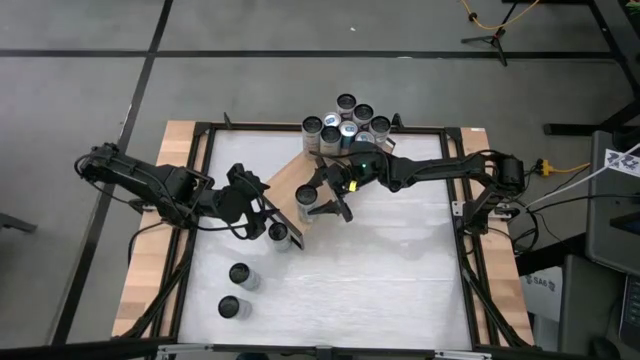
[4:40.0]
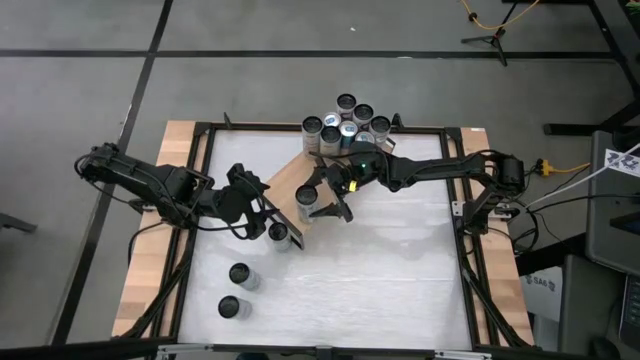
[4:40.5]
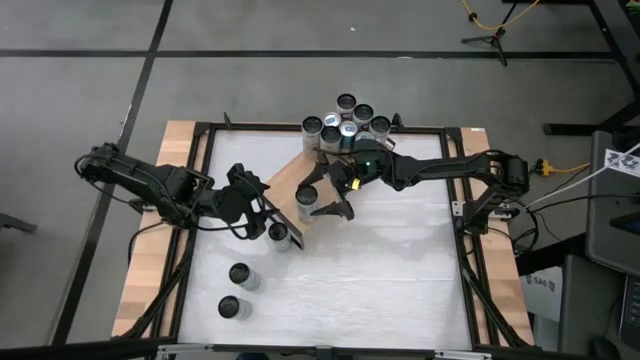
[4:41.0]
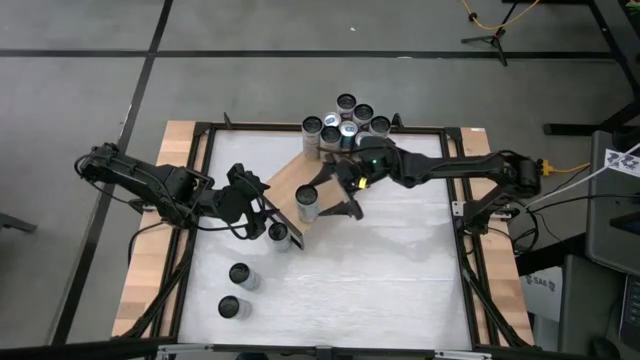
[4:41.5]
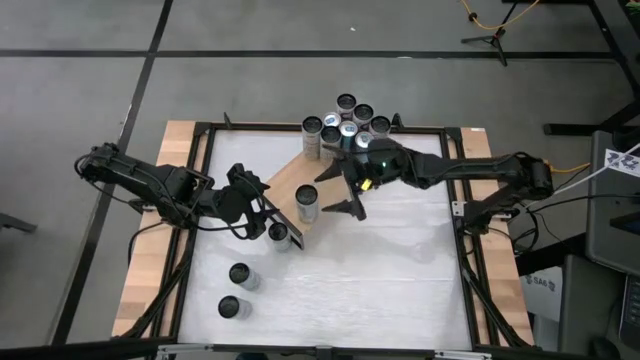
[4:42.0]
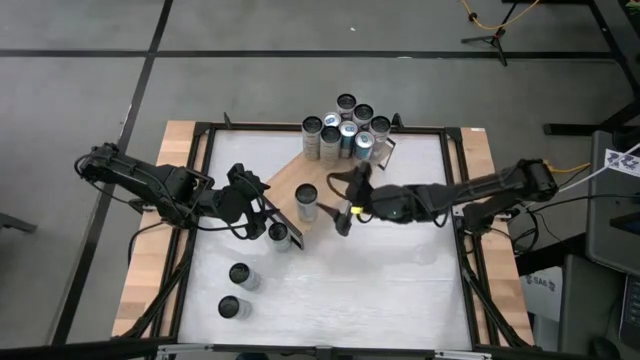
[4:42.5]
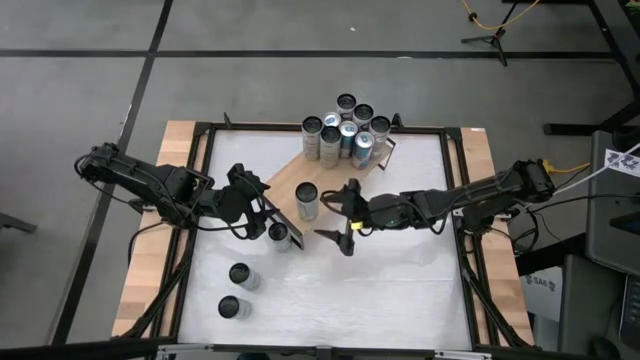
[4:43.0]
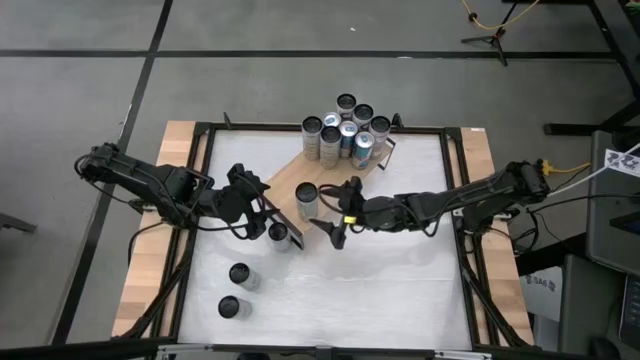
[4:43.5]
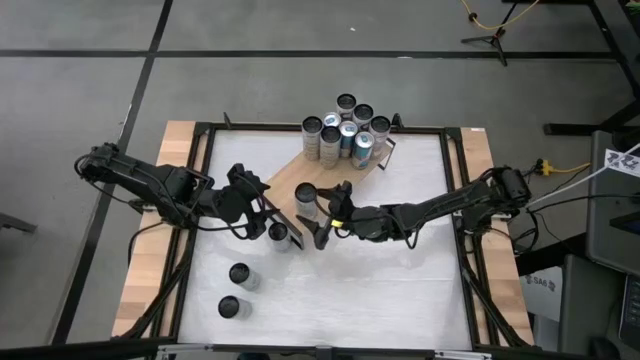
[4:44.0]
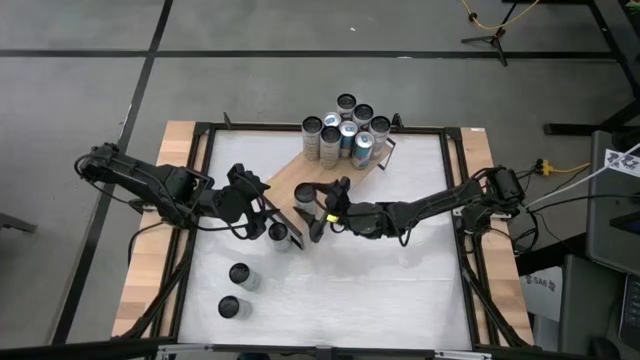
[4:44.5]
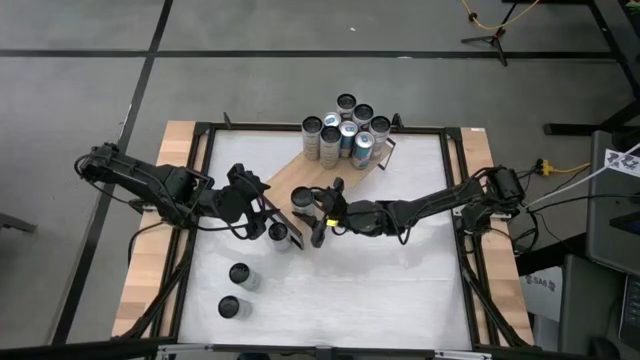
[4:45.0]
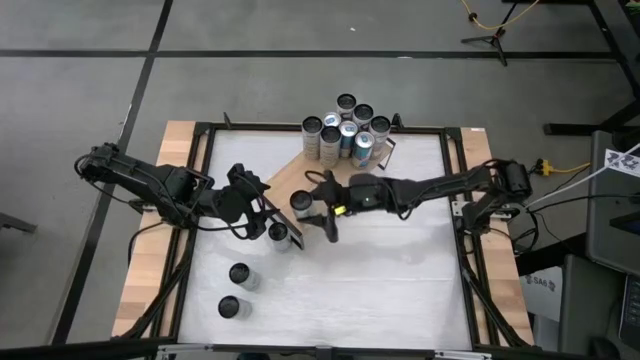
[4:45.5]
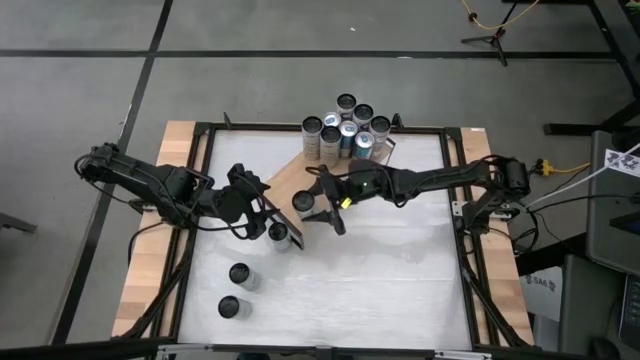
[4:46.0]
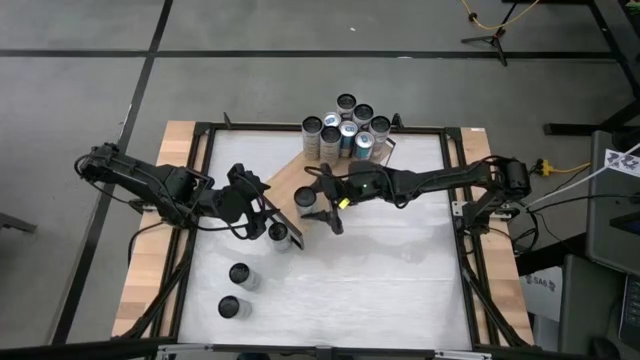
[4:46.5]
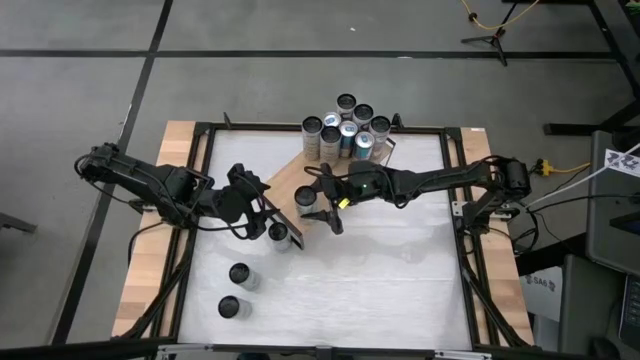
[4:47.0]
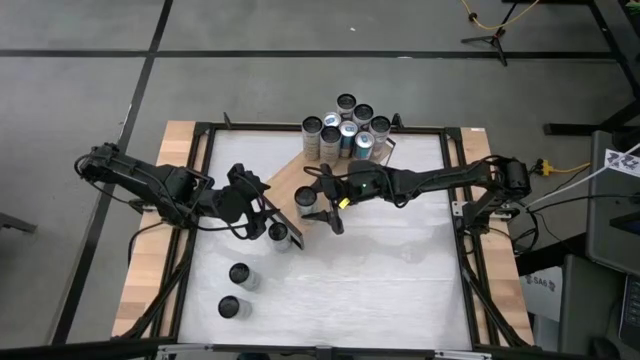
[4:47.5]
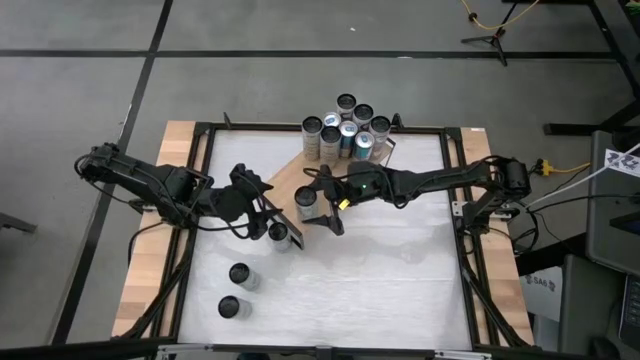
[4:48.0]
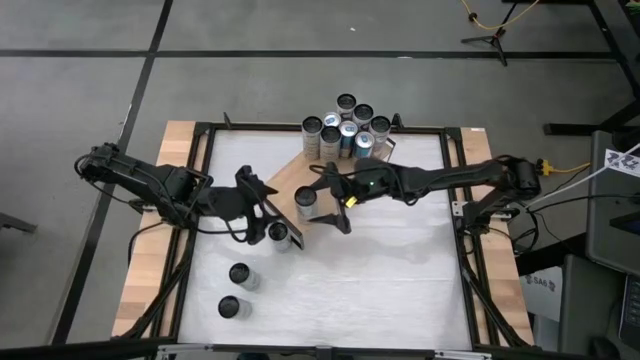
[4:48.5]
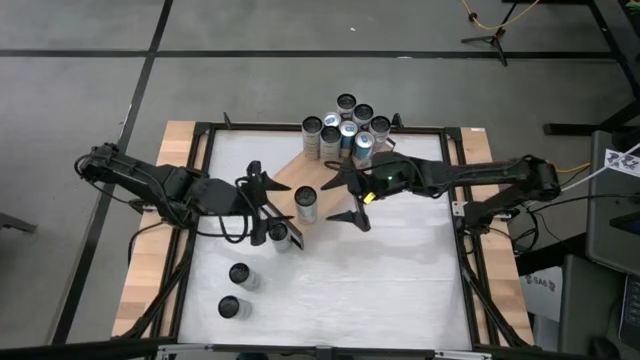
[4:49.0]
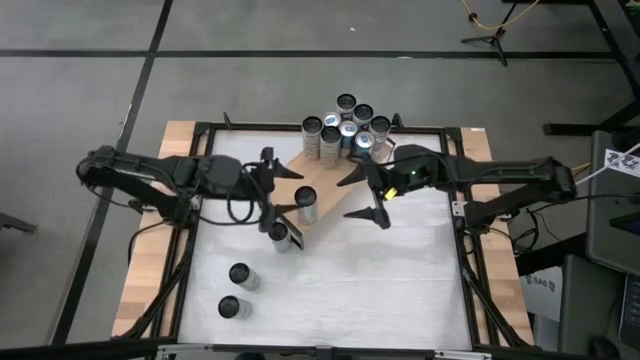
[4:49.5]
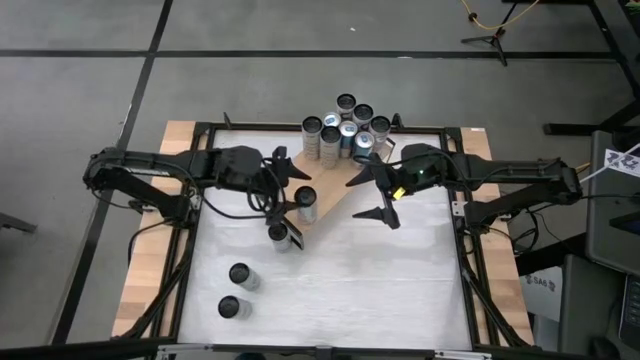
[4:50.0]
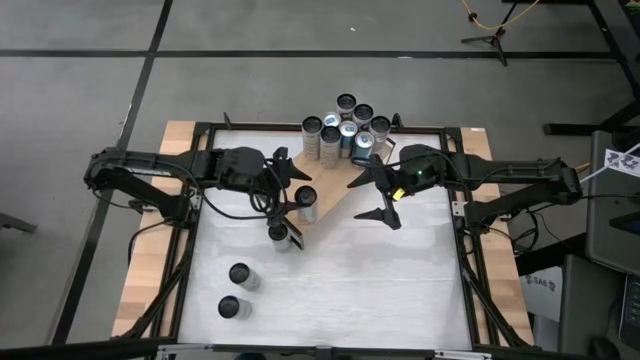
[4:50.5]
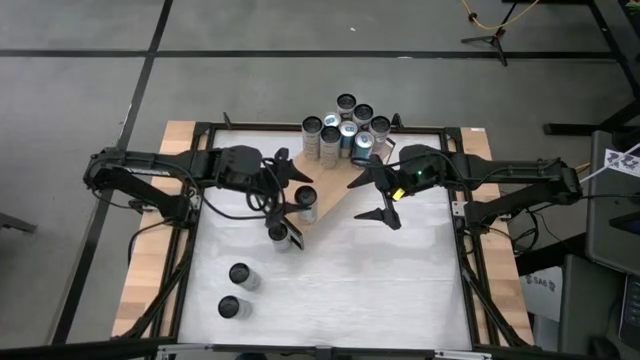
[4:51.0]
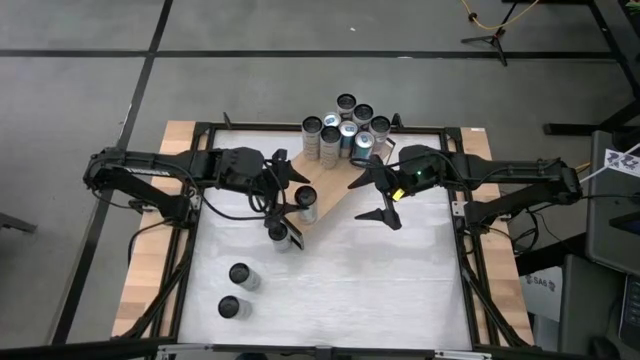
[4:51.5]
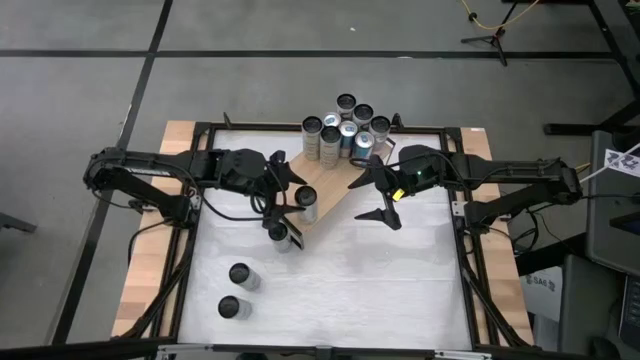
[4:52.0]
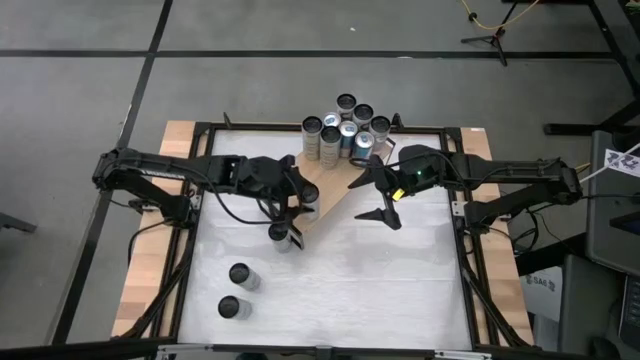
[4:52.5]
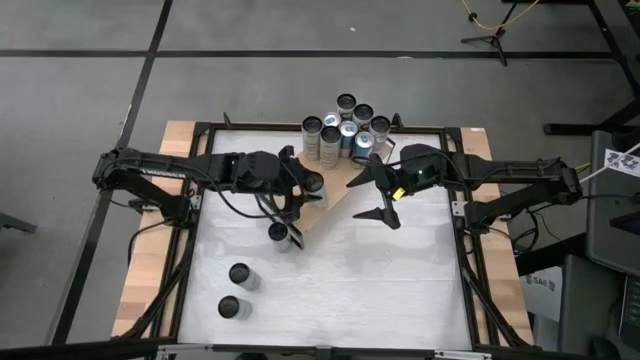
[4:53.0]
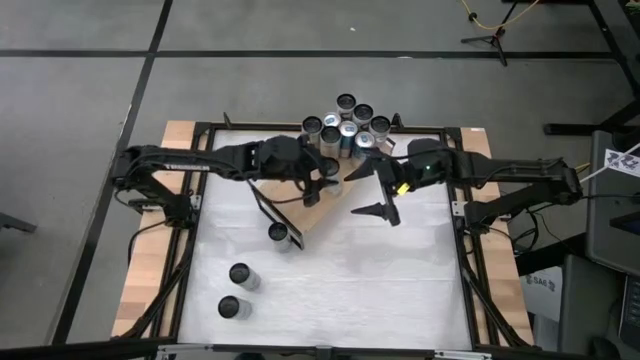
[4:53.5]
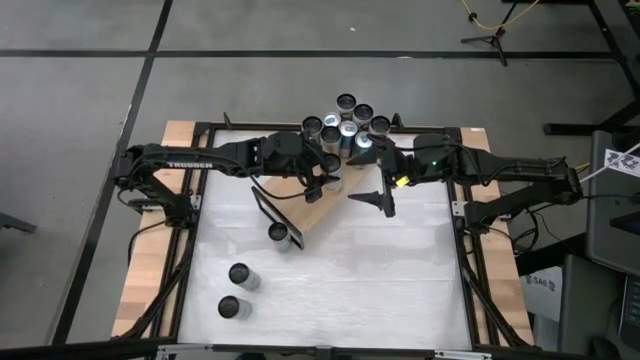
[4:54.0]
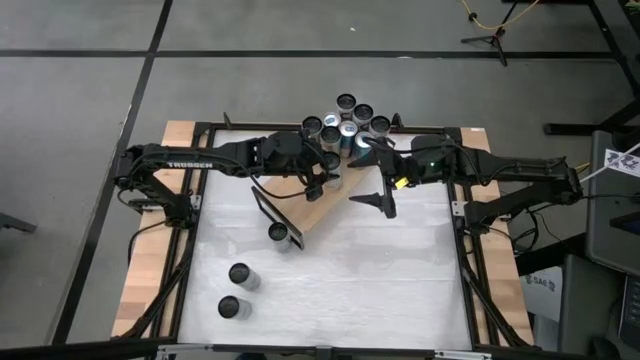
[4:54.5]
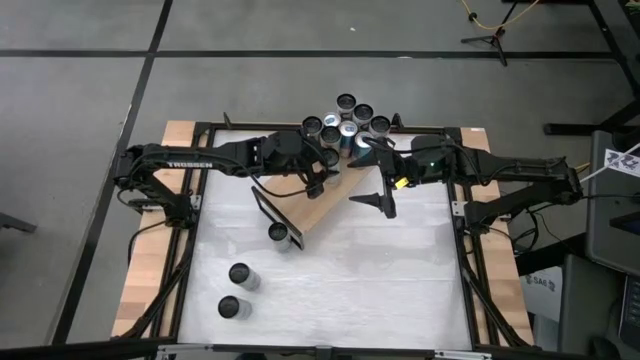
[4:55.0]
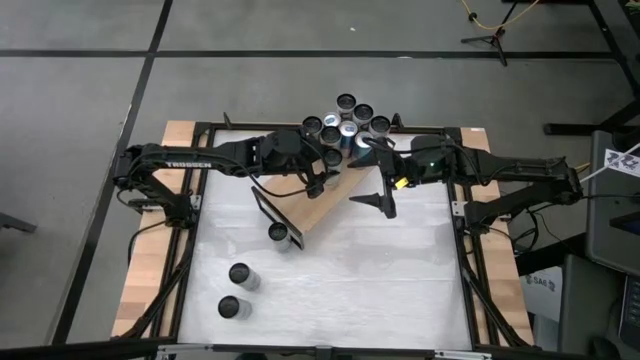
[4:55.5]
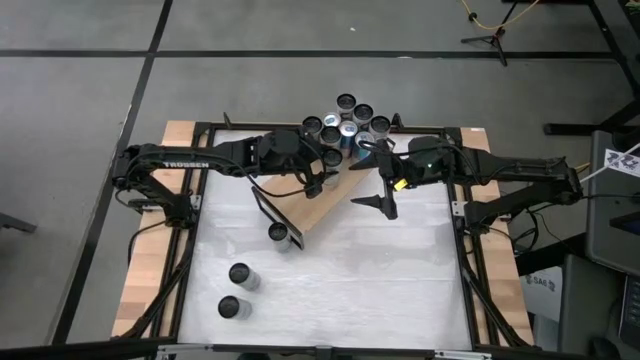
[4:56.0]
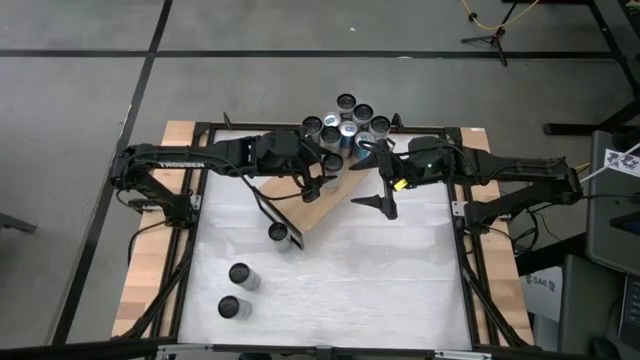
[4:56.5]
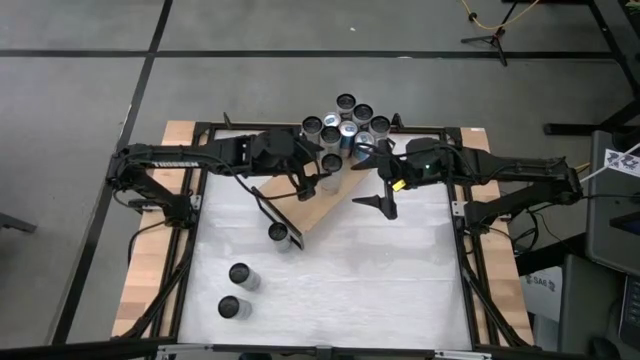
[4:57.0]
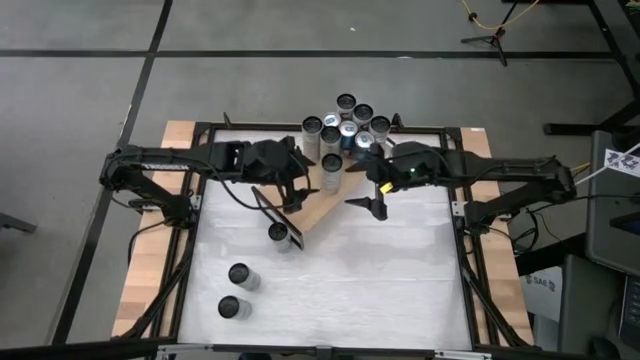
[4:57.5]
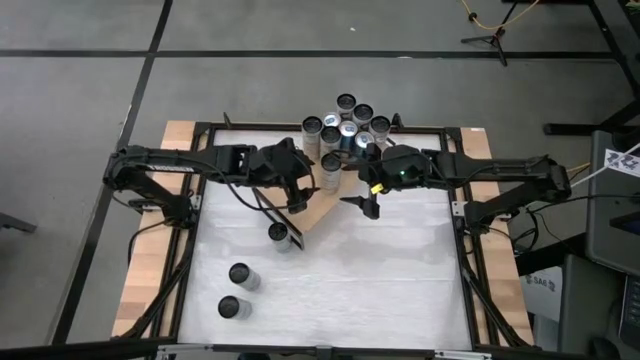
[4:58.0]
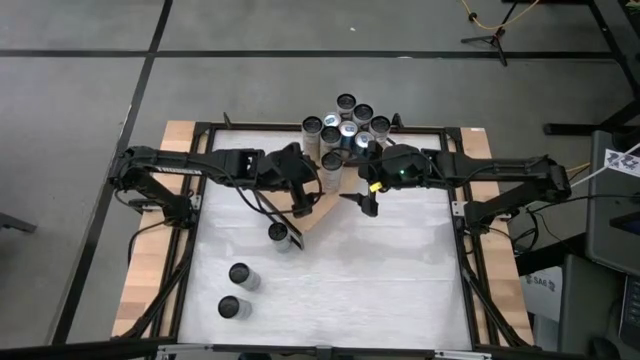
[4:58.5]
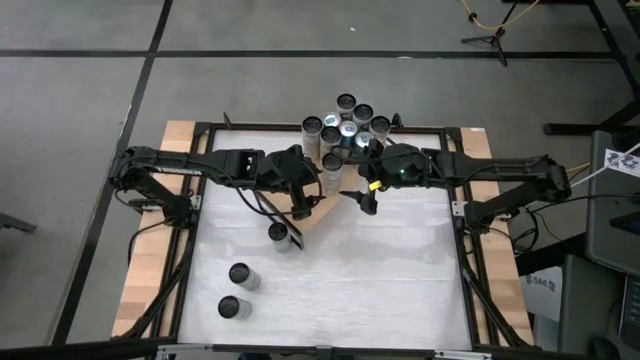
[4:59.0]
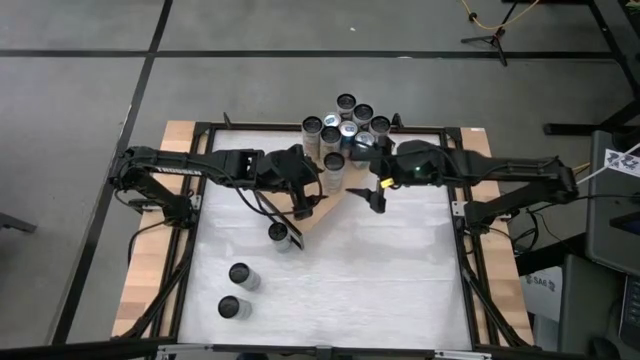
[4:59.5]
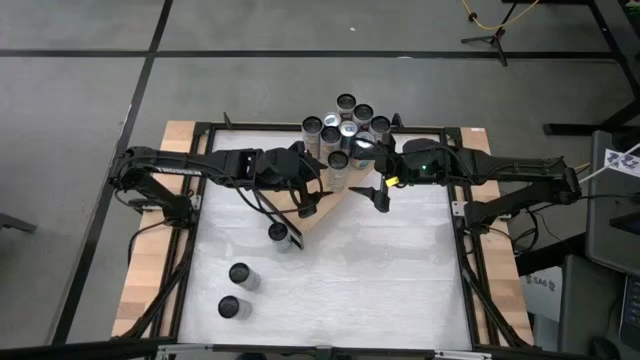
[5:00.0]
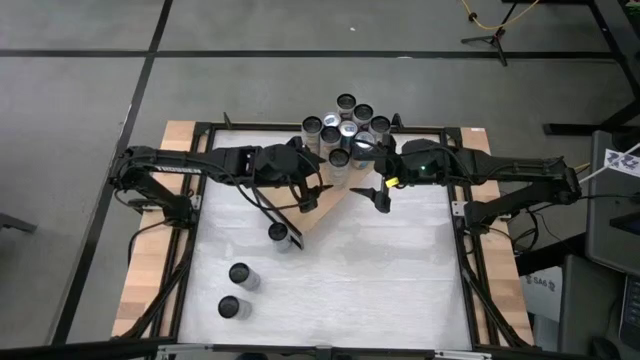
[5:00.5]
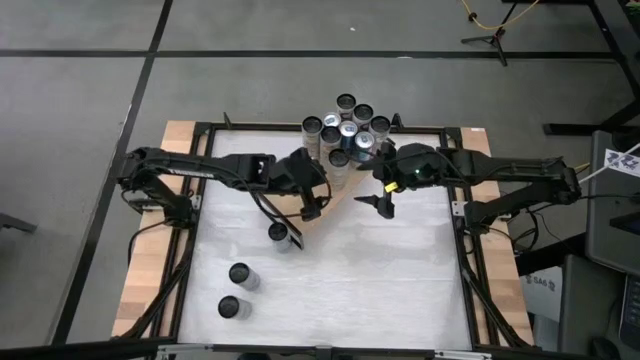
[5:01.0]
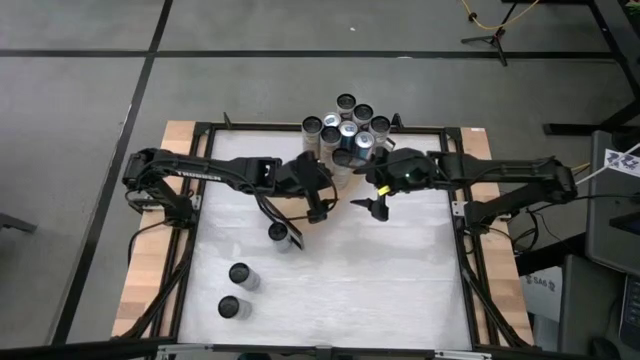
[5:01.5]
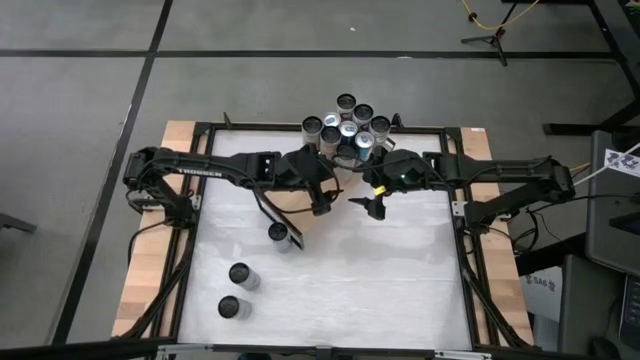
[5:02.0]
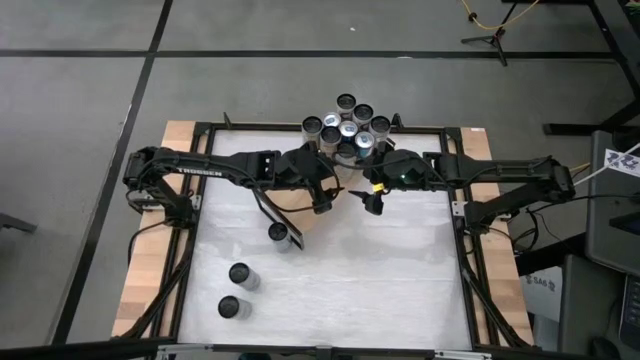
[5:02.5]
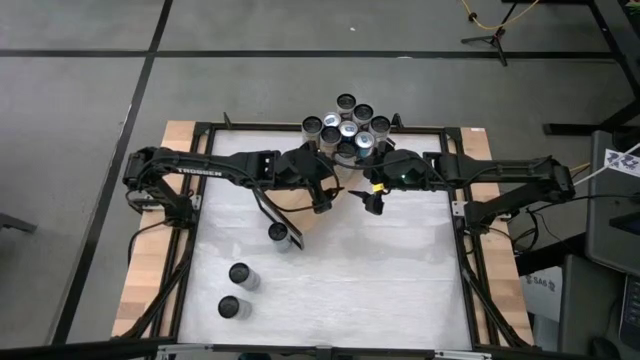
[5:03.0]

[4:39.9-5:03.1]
Task: Place canned beverage on shelf
Put the white-yellow soda can on the shelf aligned with the other white-yellow soda cans
